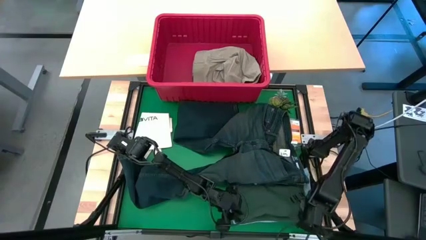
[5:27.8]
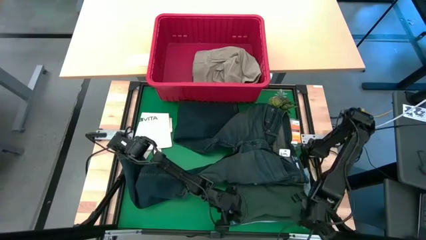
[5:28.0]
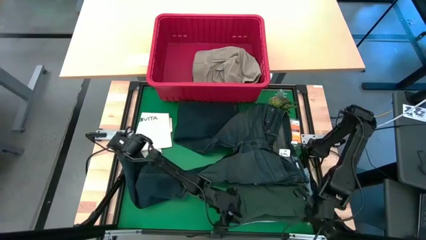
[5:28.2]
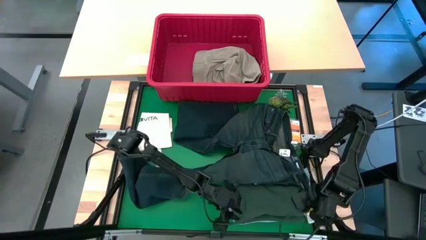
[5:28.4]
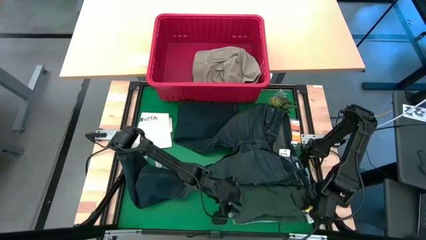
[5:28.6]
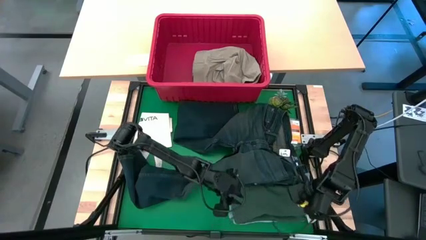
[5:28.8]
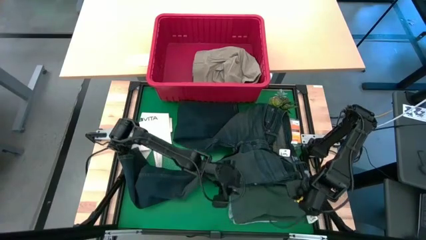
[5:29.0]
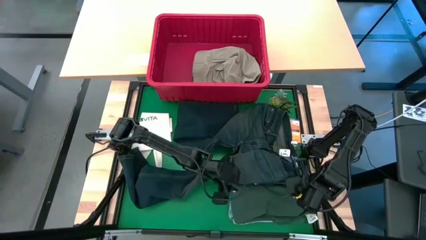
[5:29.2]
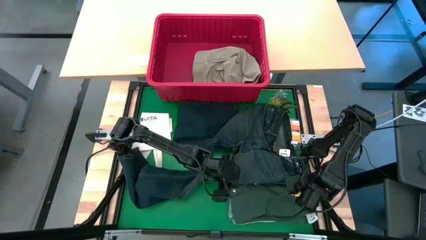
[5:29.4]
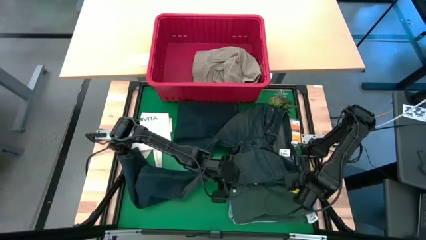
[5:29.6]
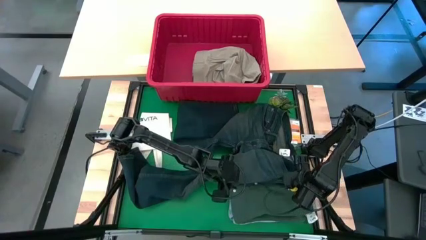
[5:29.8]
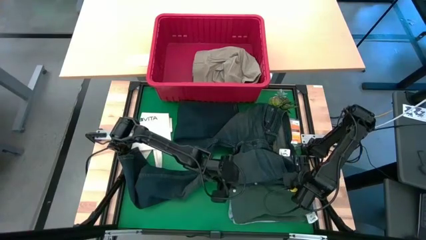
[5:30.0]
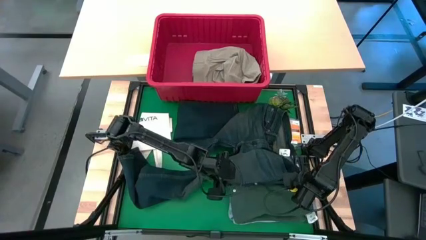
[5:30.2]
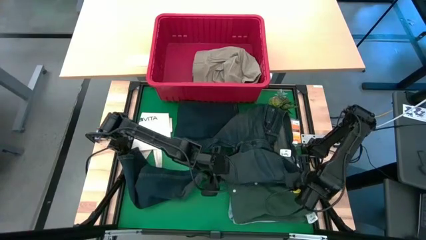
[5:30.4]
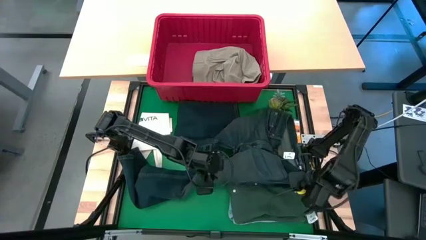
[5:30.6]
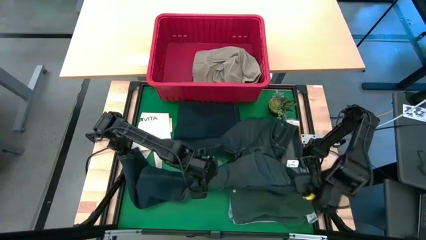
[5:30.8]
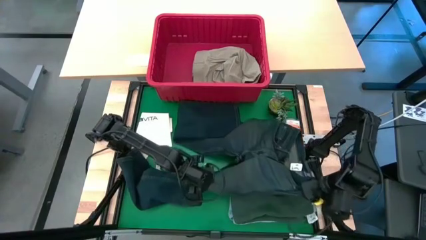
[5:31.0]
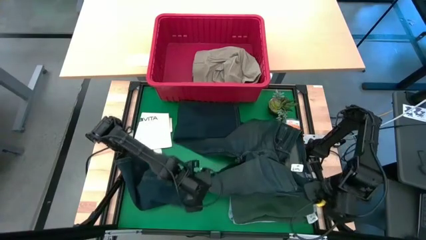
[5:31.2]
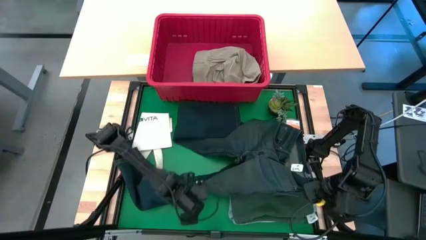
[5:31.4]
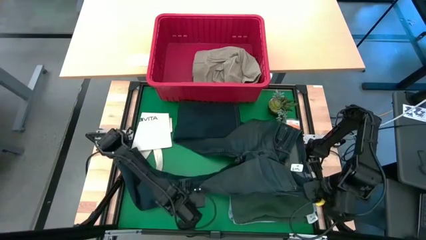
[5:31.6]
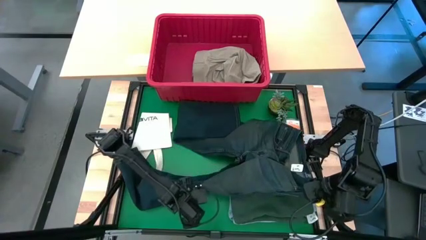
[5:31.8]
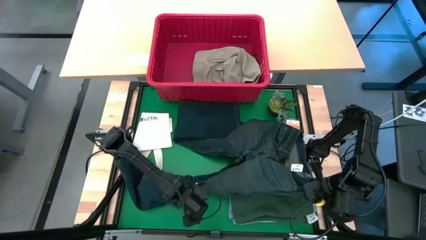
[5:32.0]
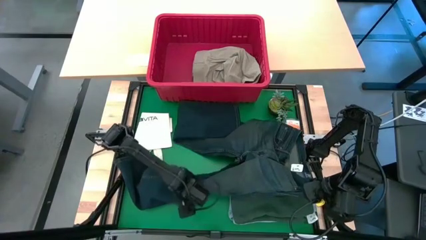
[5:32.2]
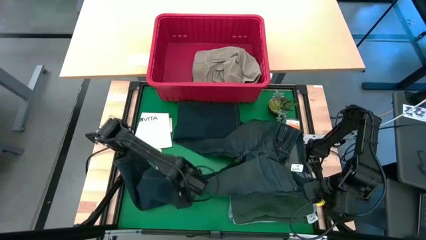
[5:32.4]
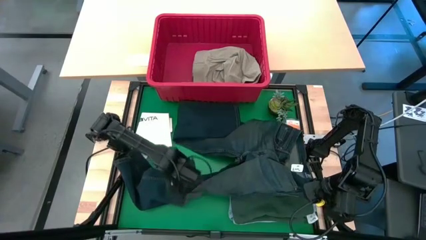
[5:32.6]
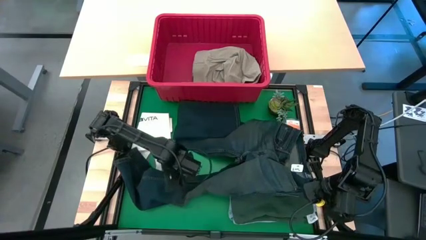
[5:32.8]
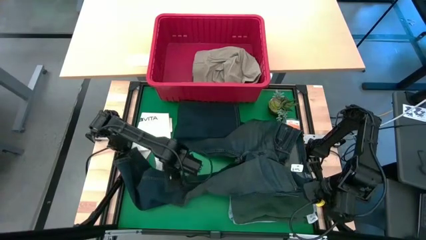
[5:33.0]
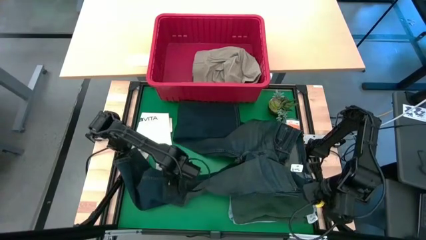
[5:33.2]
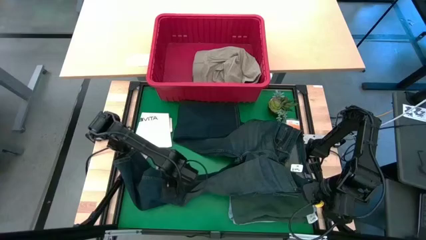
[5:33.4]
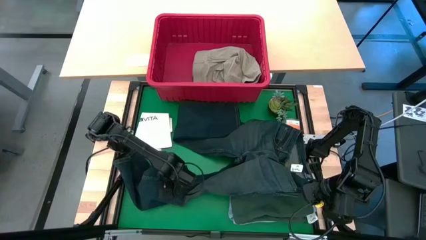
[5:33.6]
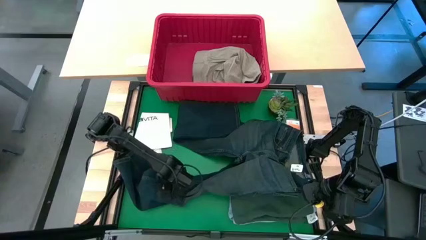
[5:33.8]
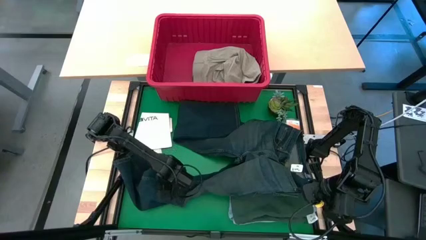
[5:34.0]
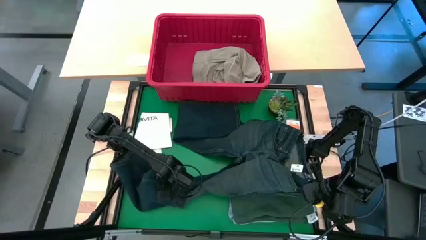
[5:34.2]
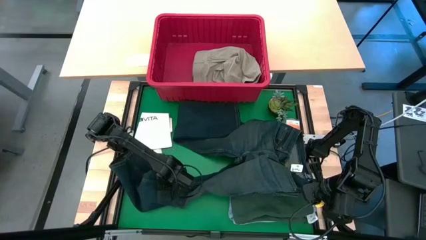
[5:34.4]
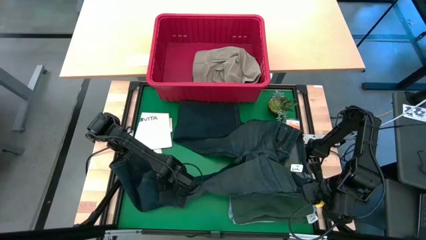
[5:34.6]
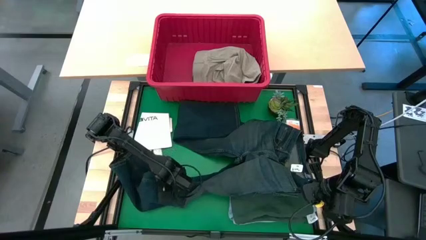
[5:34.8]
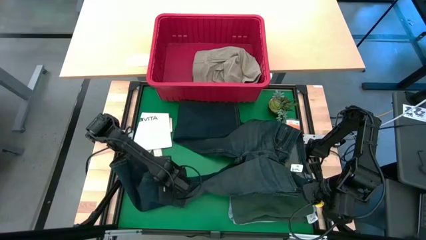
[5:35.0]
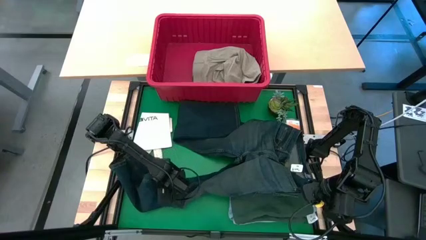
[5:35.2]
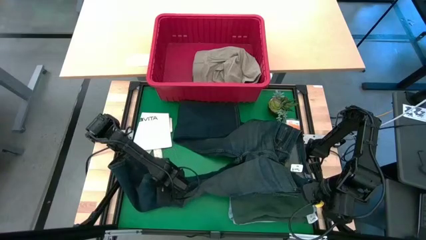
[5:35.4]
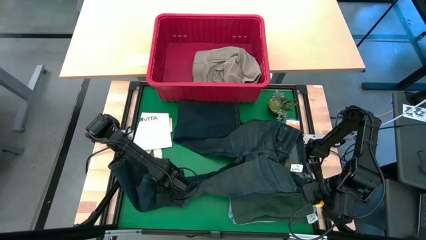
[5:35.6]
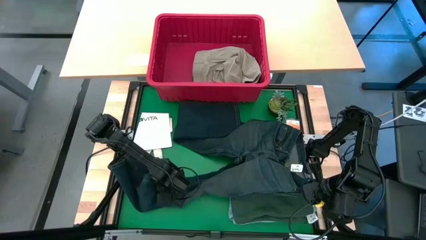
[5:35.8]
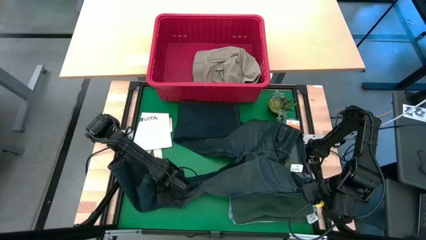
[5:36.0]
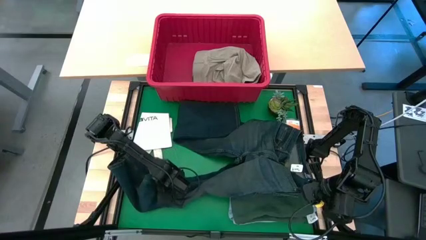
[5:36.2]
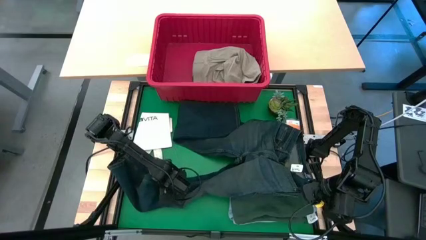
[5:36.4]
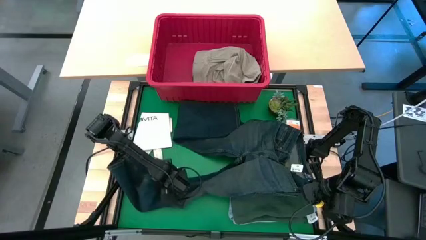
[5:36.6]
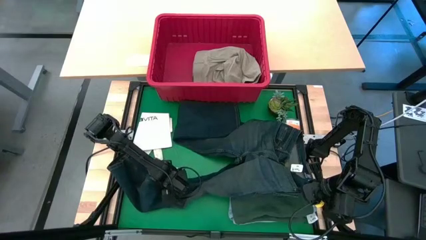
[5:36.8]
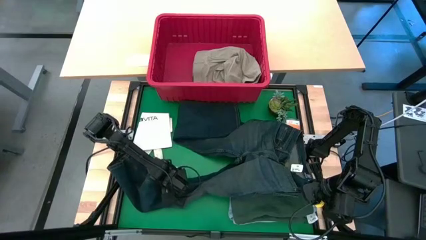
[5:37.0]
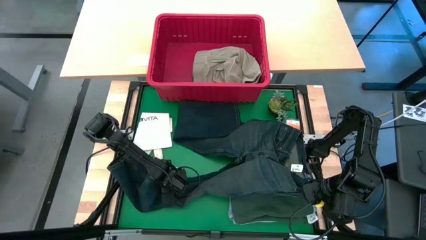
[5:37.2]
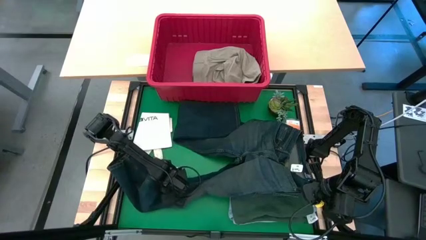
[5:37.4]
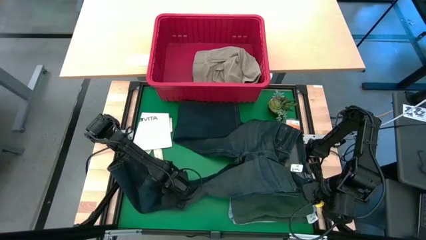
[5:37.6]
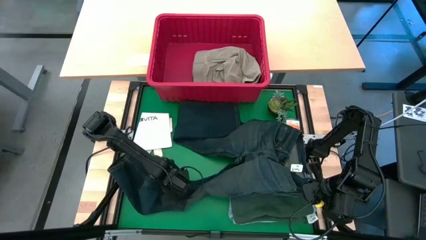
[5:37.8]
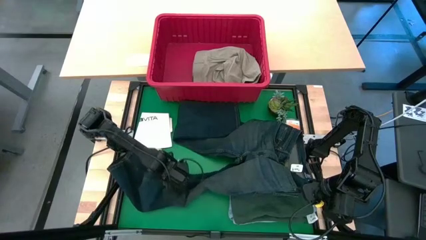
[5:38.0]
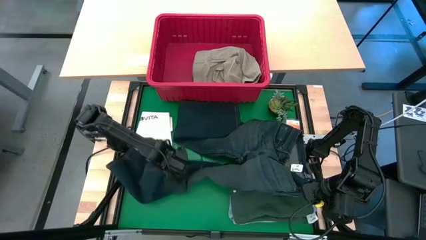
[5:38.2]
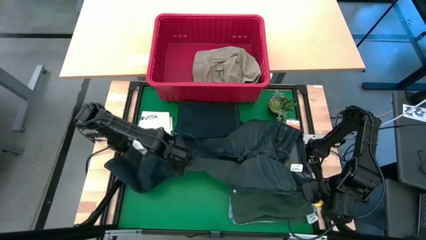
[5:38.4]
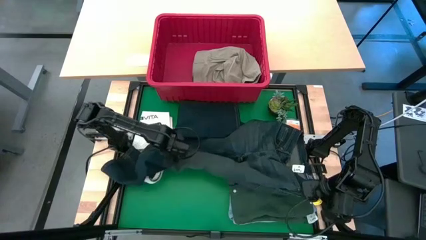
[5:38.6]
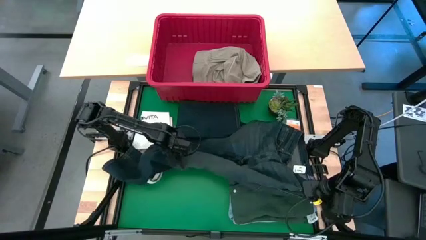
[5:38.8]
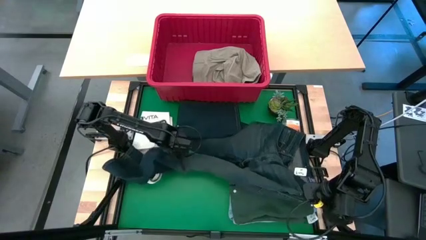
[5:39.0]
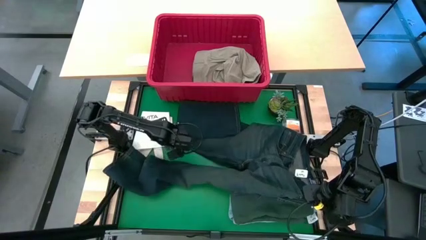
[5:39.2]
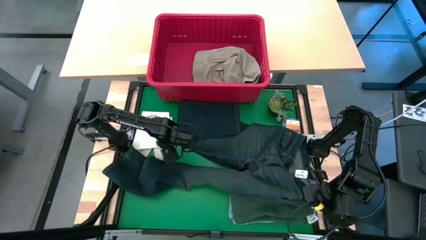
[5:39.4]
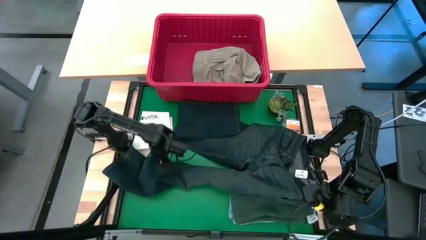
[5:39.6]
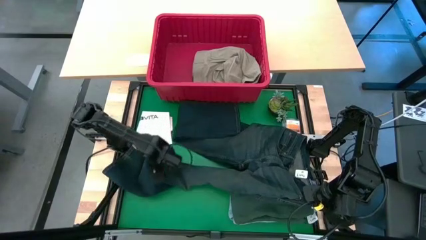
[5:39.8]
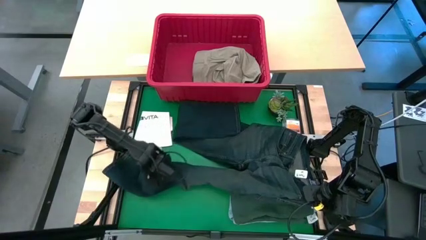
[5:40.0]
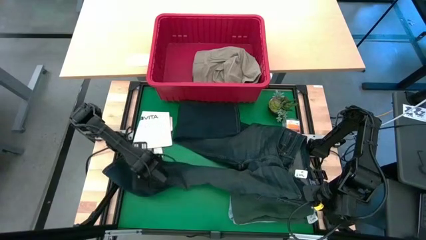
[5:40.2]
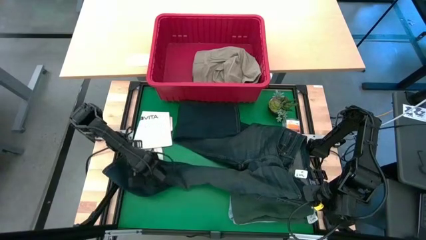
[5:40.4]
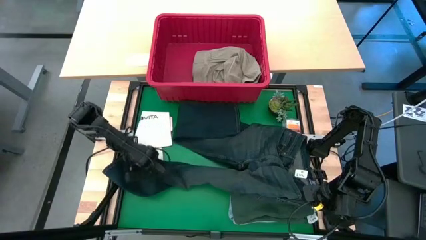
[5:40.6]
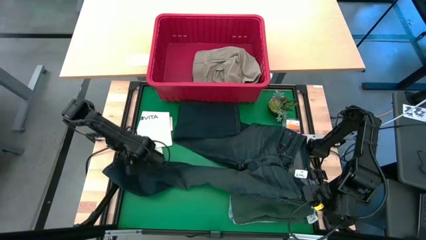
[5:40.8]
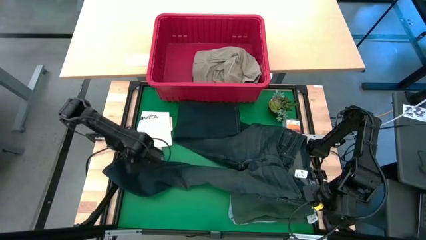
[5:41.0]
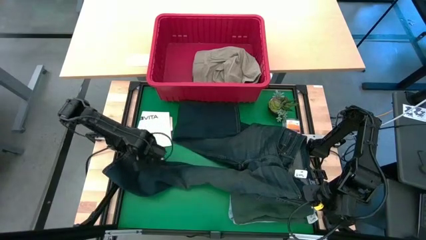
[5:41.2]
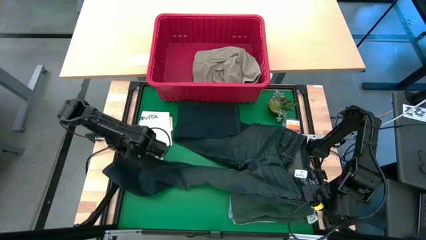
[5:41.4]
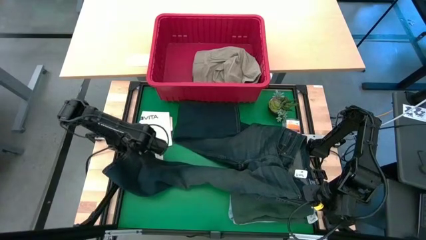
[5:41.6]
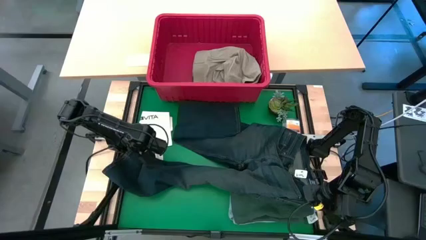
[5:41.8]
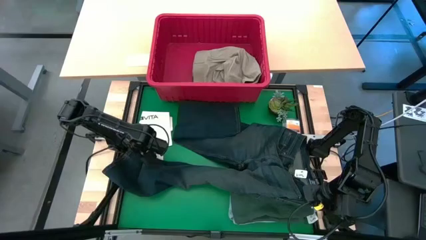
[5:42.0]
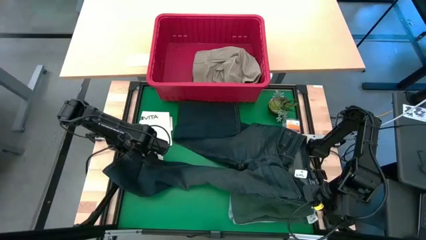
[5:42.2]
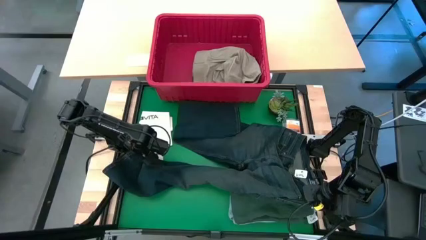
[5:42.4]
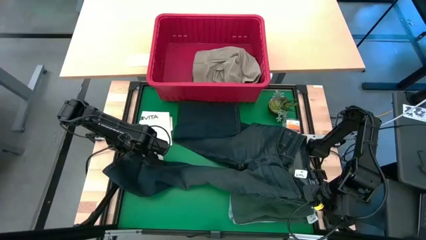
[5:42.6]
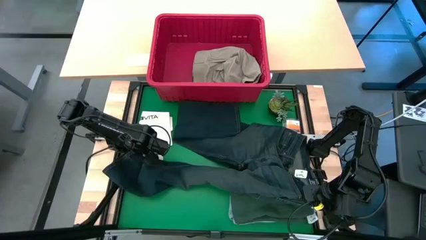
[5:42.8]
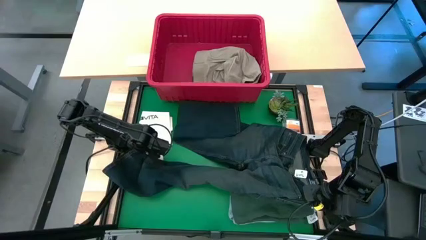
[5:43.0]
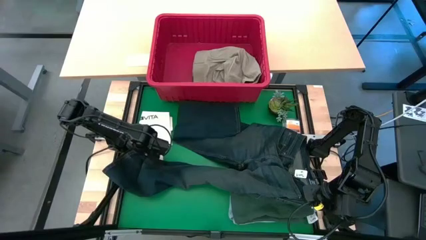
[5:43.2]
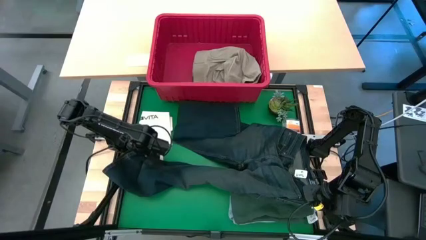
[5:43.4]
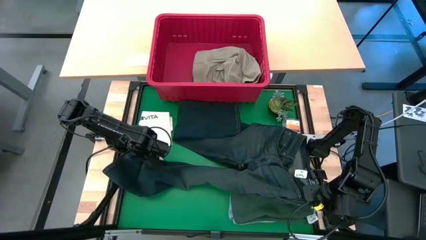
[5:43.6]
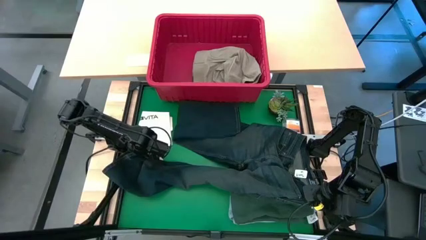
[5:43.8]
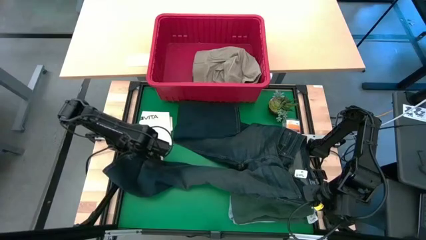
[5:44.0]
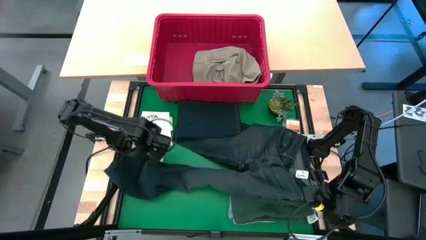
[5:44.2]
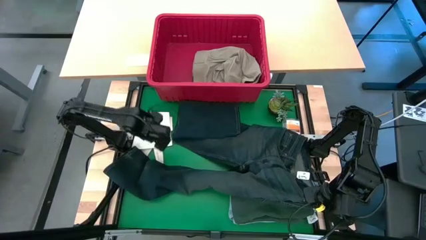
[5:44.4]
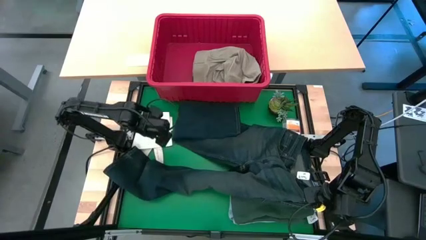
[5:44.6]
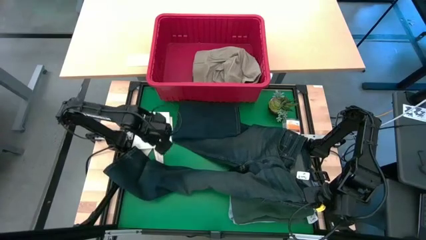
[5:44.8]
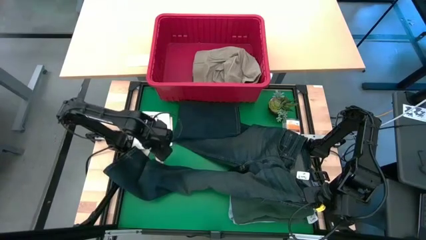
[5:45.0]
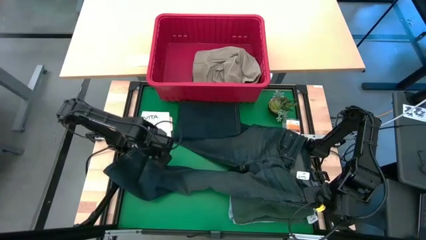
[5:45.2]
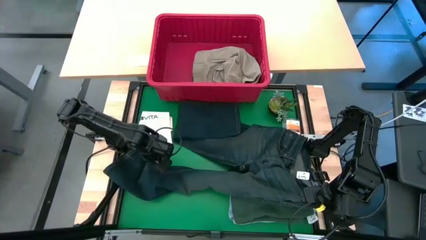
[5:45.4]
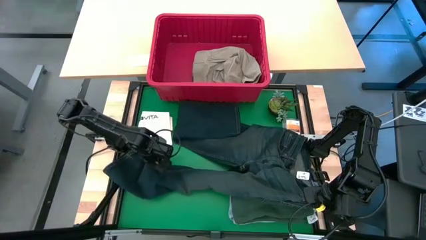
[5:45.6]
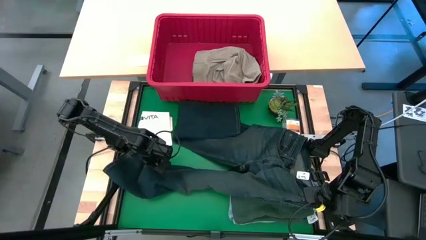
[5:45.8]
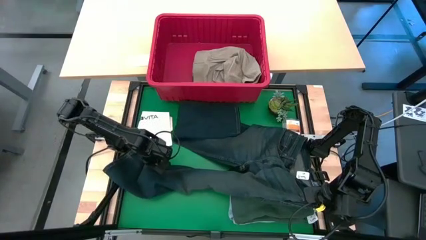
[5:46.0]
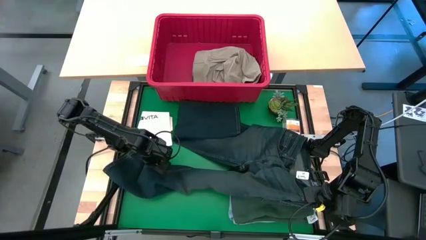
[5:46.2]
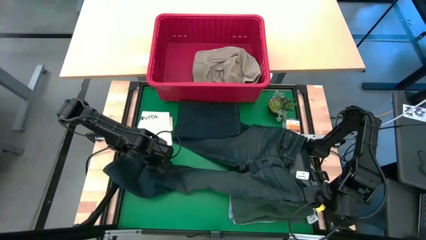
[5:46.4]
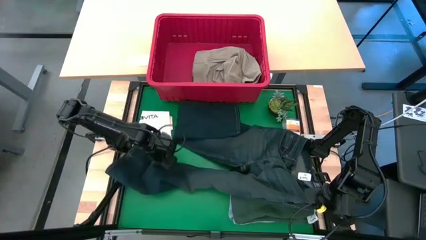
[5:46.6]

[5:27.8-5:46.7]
Task: Fold Laundry from Bin
Fold the dark blue jeans
